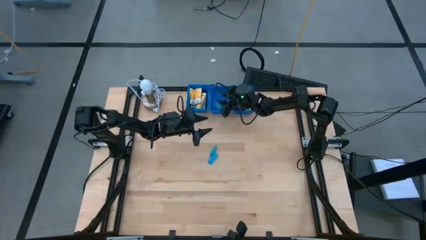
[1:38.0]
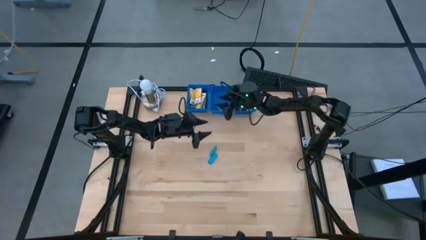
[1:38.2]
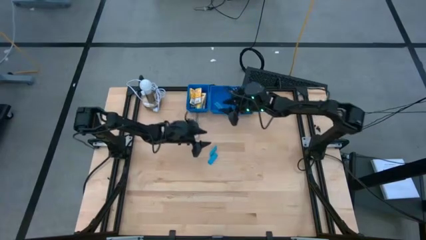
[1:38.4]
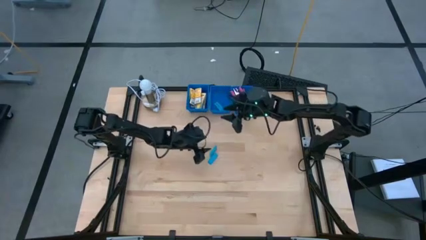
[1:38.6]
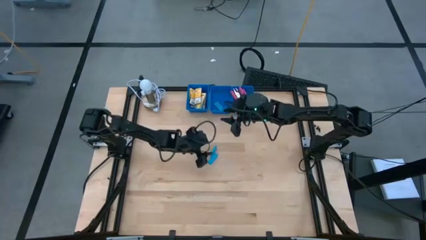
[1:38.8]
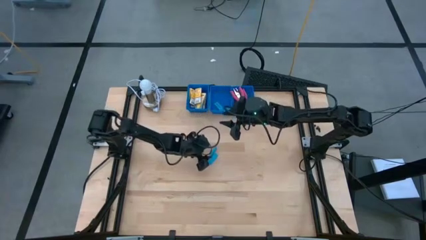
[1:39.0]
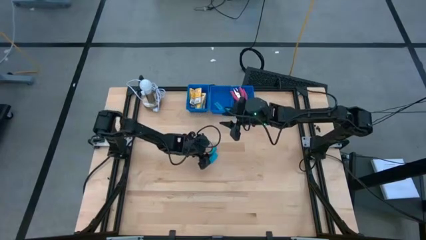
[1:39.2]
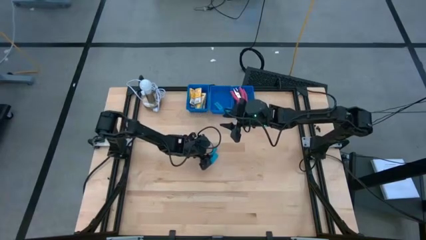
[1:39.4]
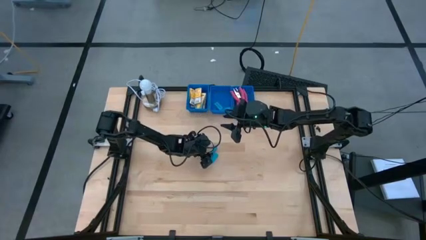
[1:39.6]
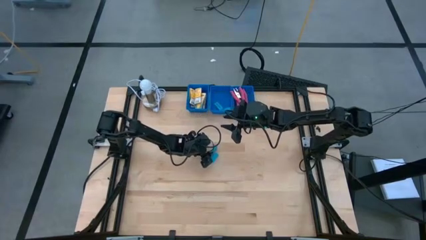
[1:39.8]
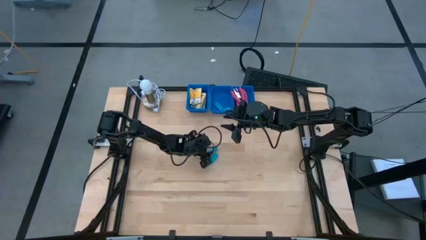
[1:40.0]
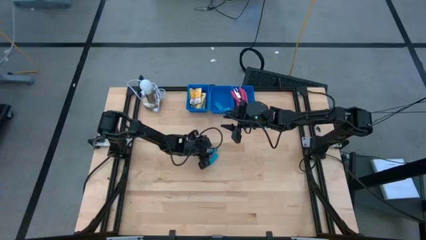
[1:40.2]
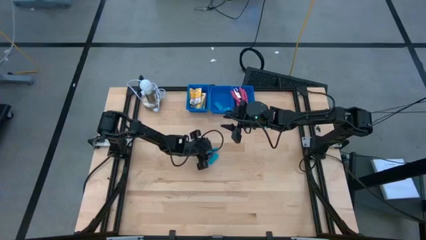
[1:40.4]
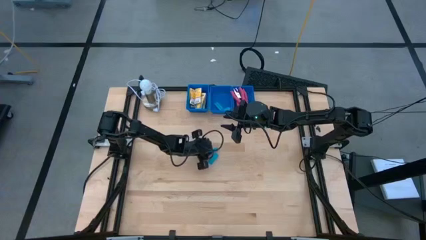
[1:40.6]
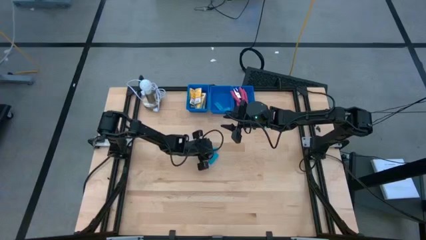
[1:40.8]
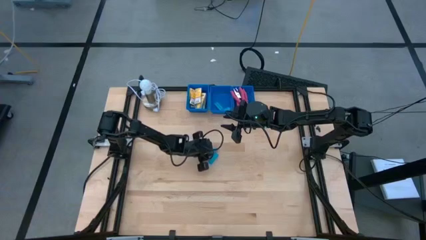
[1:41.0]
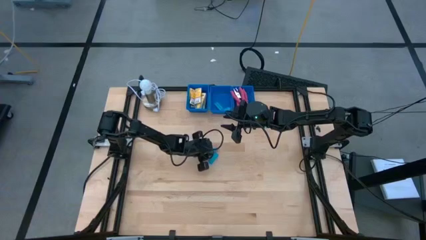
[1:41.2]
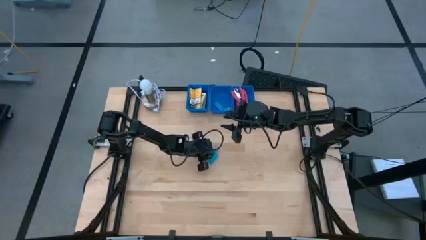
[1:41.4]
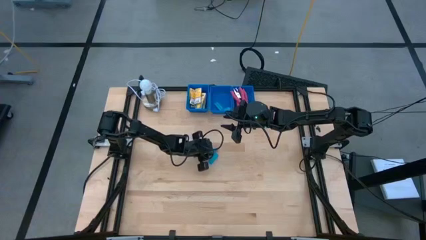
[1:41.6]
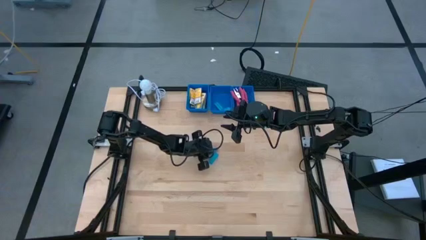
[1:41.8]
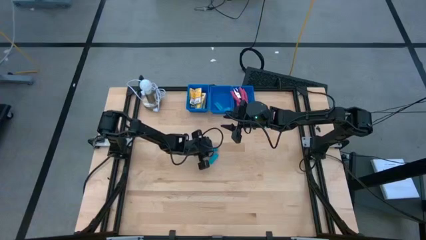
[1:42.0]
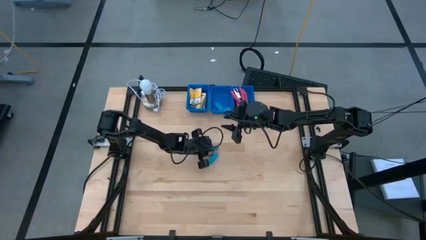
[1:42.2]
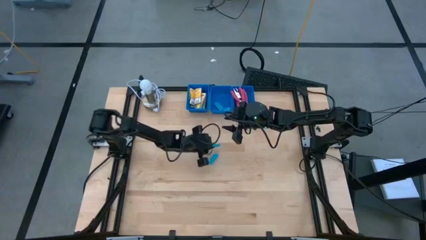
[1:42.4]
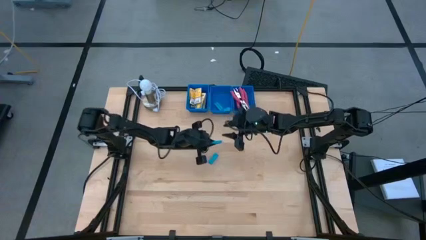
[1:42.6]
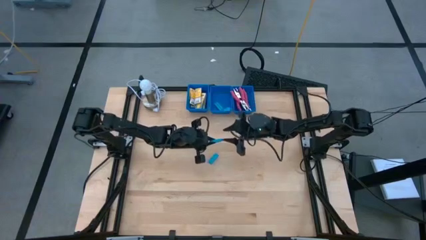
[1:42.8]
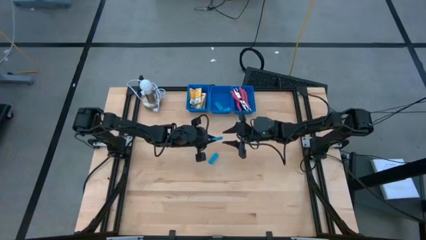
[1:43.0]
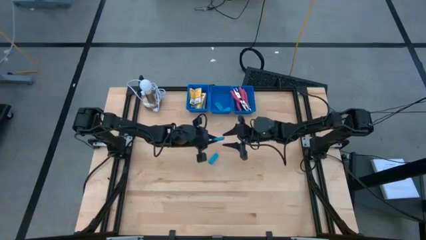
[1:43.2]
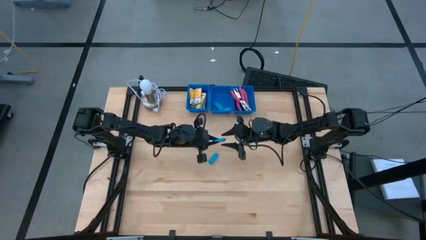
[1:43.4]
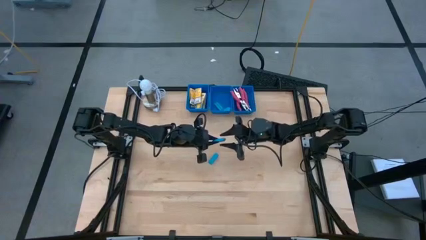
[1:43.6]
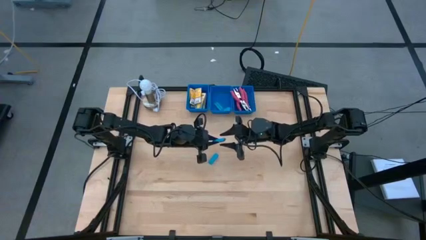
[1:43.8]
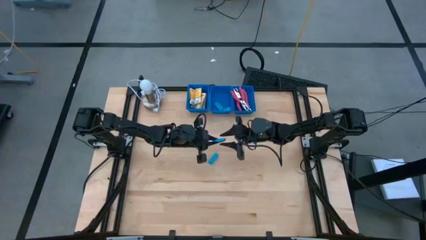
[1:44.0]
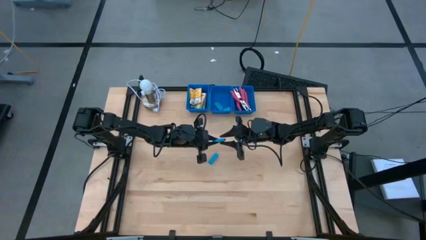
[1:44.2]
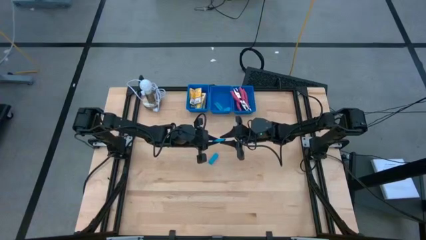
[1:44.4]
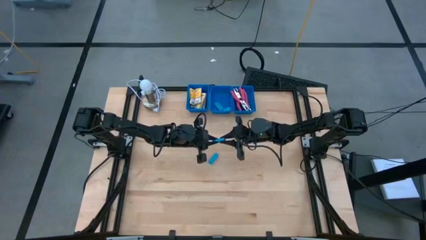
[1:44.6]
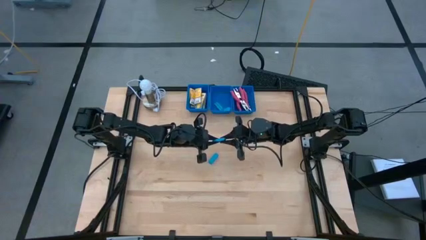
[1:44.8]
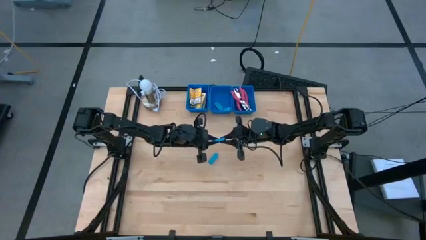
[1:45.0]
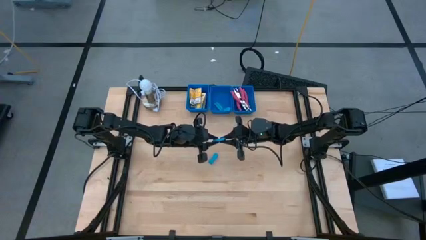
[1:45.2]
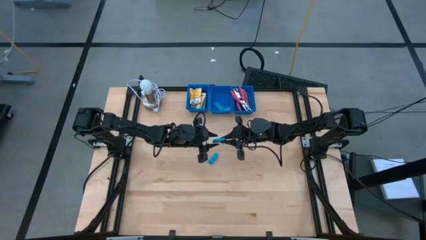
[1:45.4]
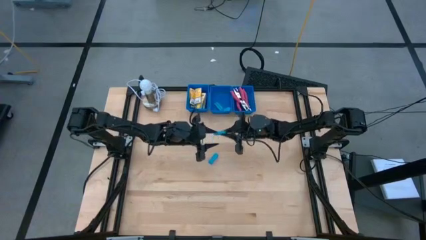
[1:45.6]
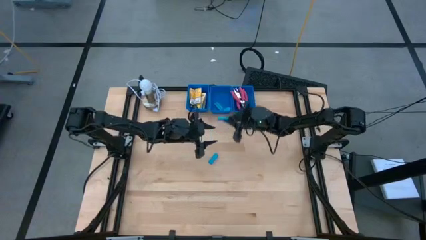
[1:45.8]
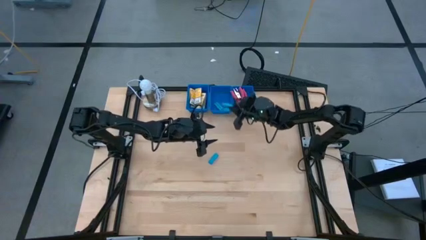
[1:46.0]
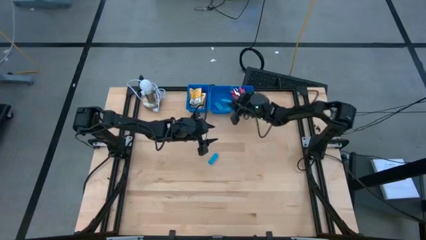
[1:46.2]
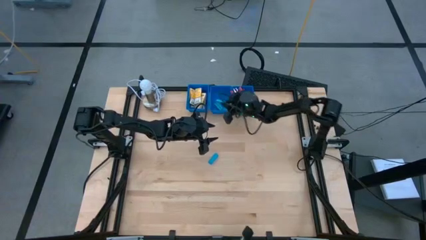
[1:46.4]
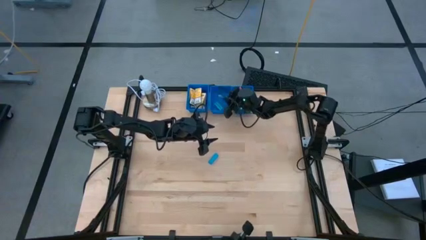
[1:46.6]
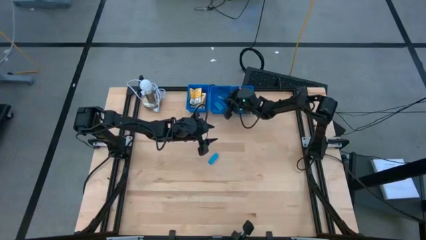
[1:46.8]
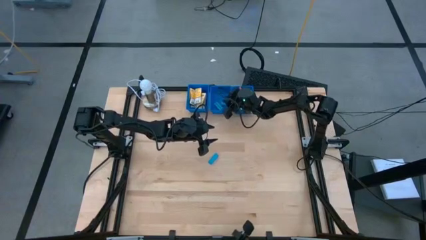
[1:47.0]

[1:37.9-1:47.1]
Task: Pick & Place School Supplies
Put the blue eraser into the middle blue bin

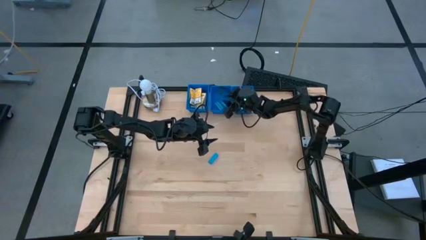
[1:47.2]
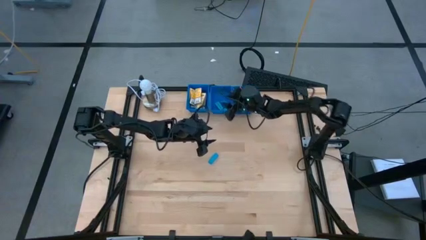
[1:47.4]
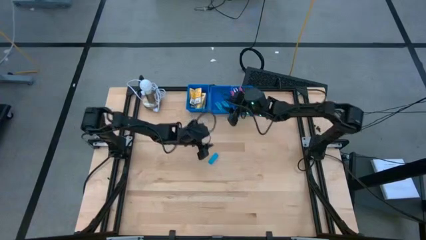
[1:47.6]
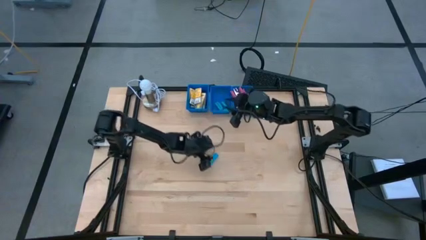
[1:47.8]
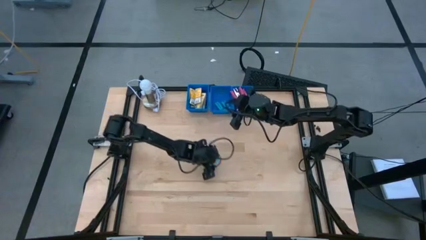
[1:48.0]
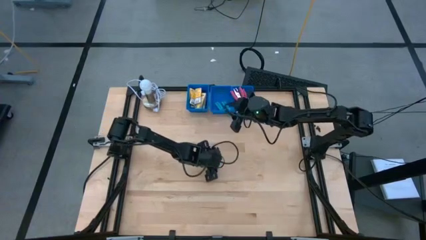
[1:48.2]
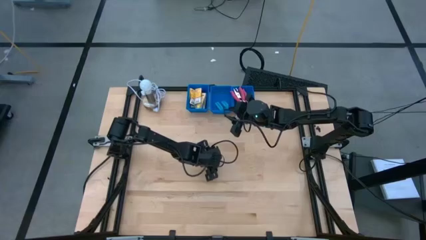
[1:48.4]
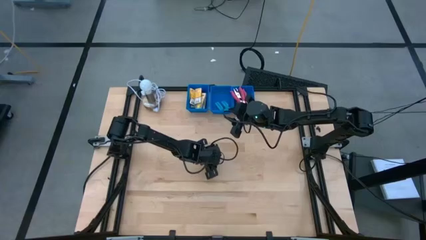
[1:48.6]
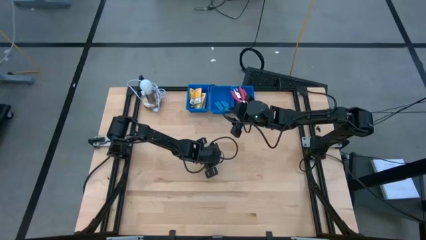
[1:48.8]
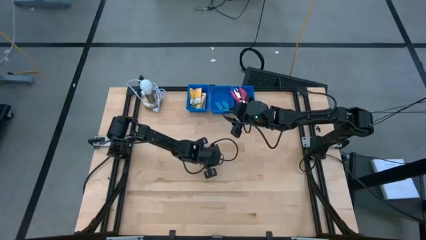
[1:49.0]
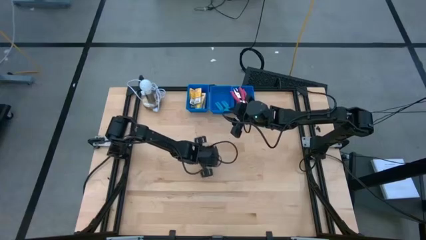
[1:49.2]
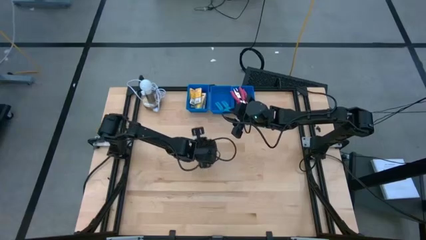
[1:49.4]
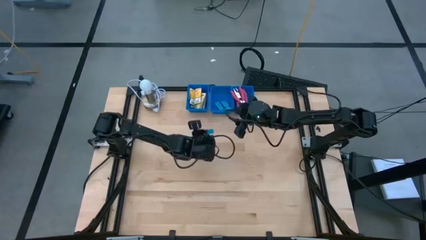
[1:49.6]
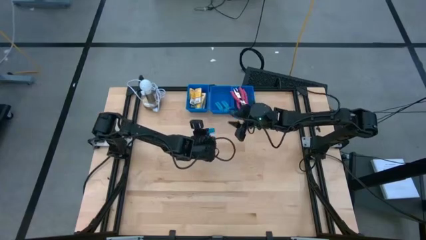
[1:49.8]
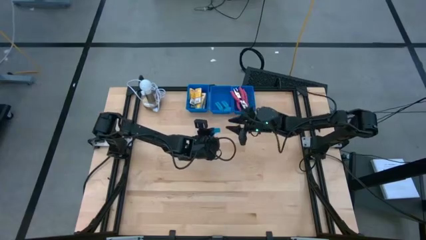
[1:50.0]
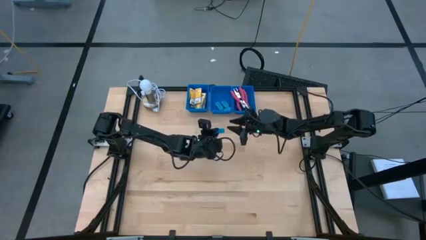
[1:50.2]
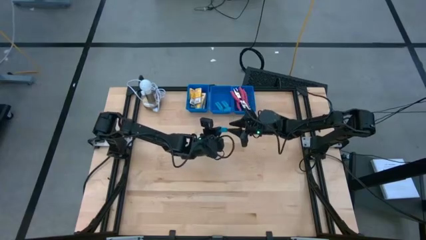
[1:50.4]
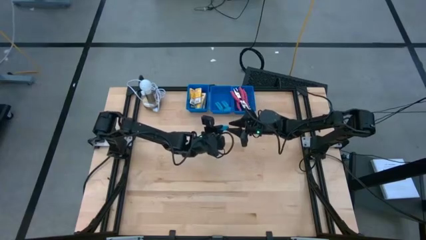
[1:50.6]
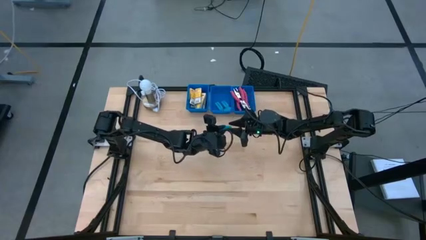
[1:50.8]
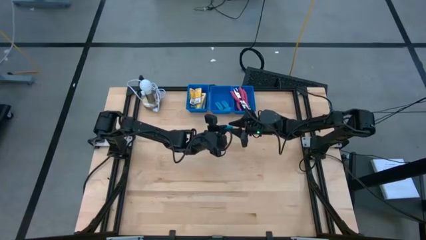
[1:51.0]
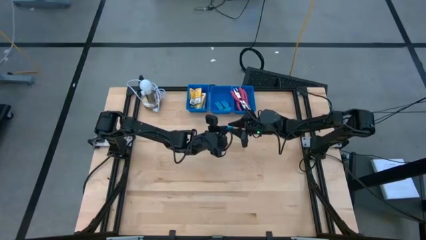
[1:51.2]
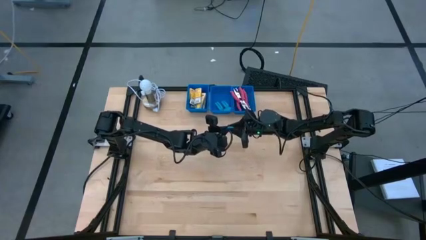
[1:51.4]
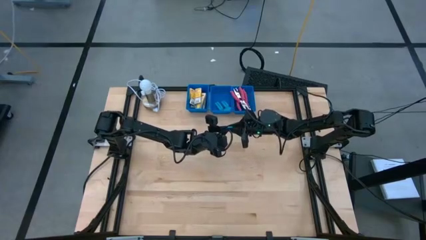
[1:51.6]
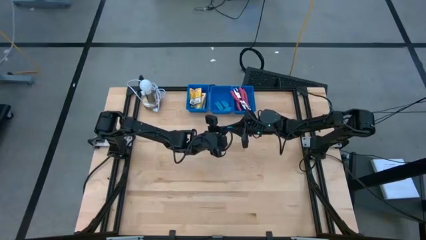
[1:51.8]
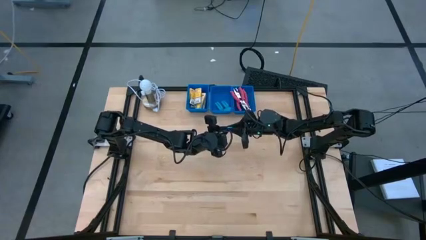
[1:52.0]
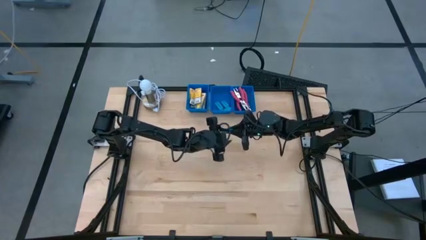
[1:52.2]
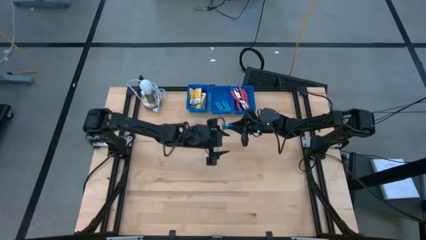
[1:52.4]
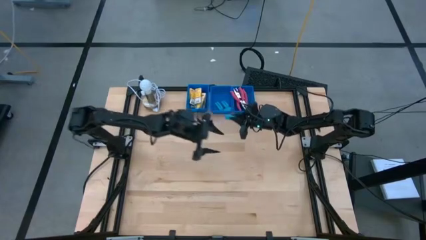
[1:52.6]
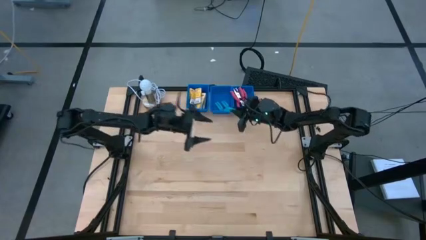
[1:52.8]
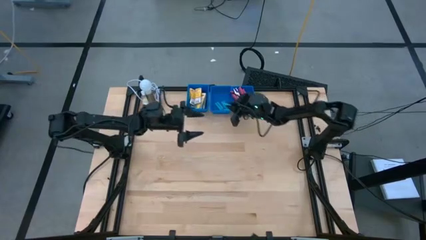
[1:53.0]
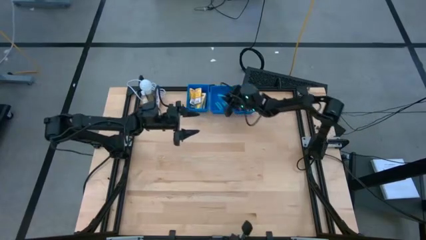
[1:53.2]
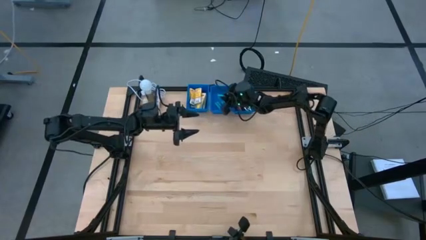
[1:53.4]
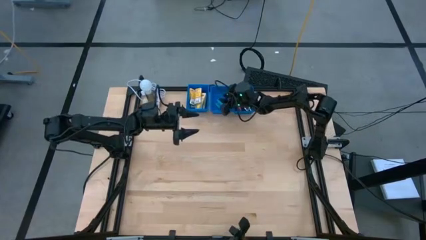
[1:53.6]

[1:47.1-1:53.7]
Put the blue eraser into the middle blue bin

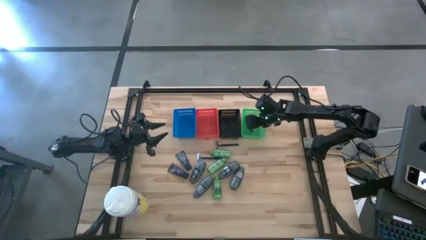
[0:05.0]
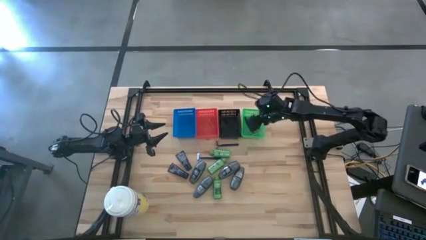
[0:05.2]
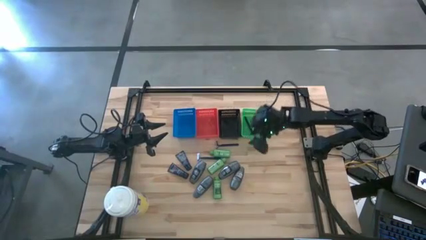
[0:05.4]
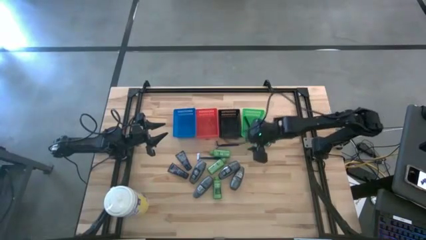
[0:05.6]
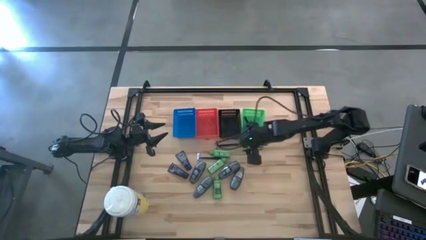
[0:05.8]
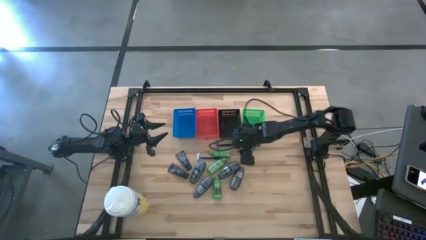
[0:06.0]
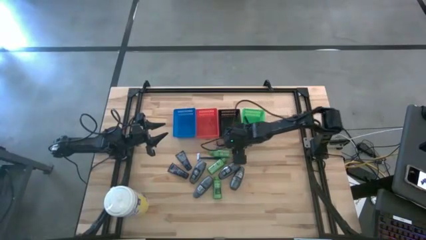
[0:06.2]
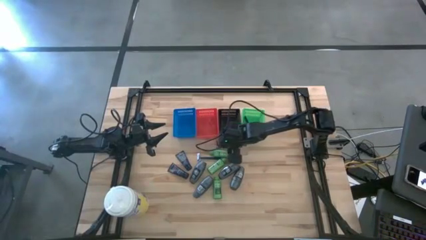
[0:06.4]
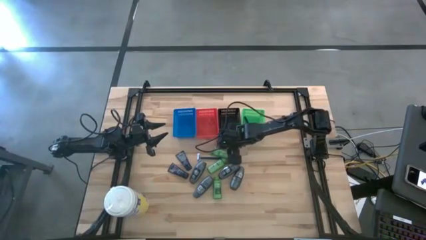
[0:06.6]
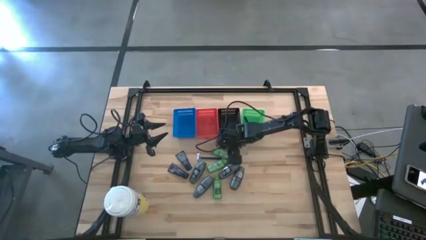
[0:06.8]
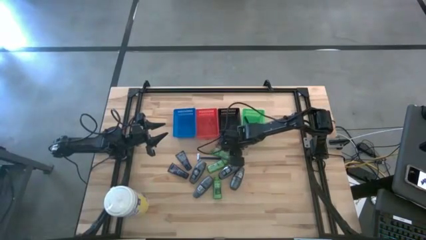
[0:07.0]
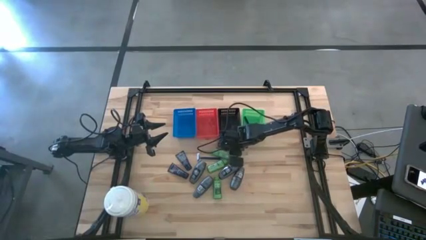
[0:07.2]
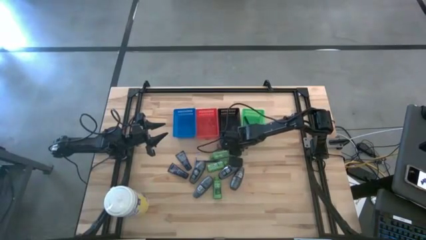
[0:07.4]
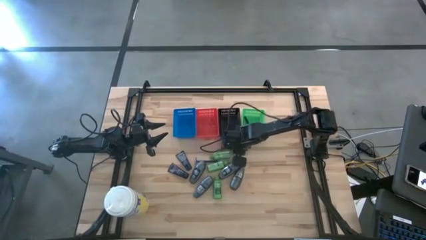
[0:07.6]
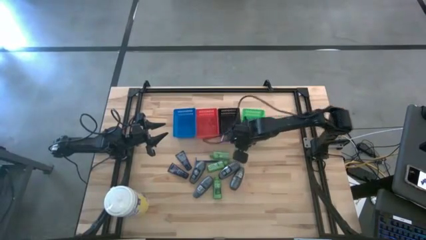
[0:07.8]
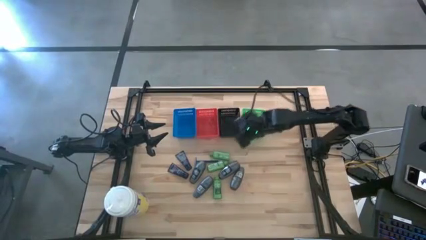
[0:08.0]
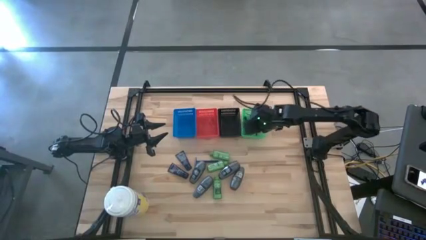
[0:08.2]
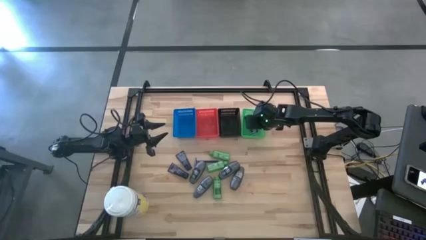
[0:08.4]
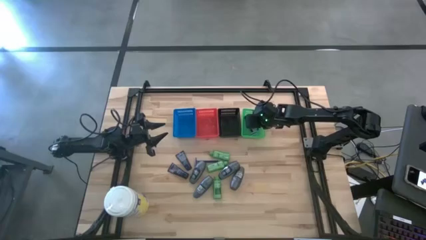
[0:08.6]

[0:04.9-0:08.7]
Task: Pick & Place Travel size toiletries
Put the blue razor into the green bin
